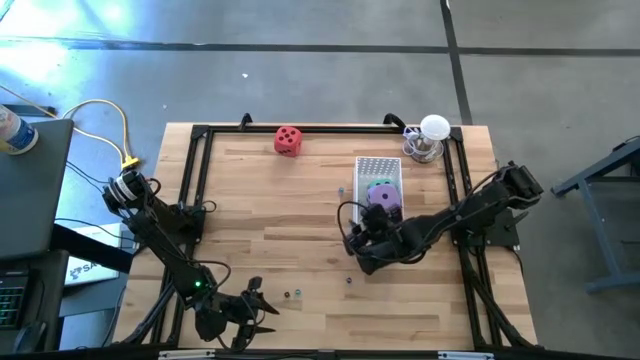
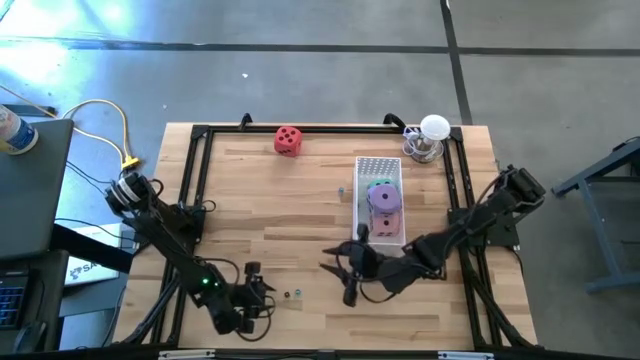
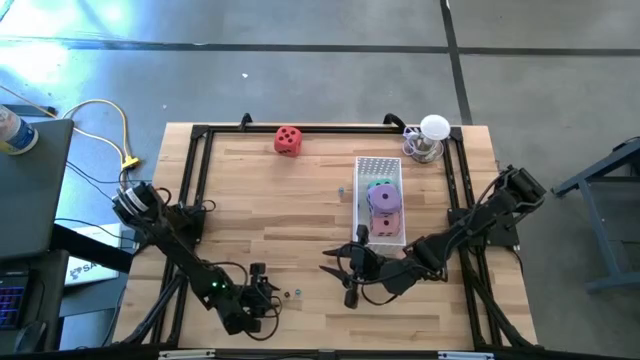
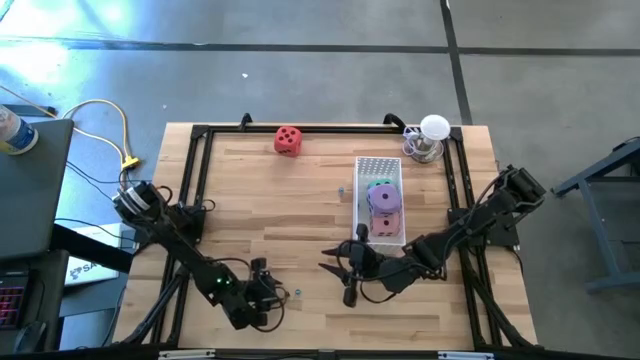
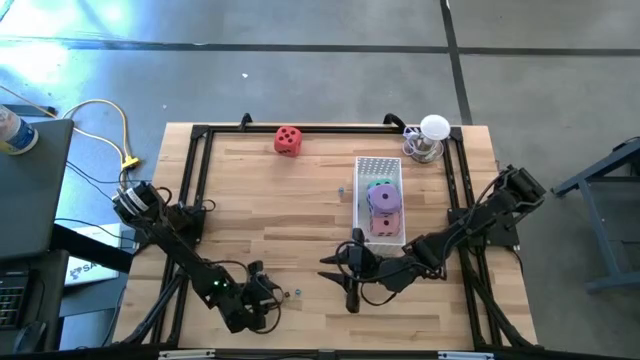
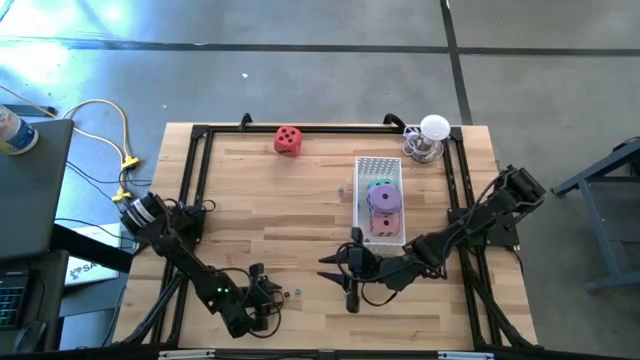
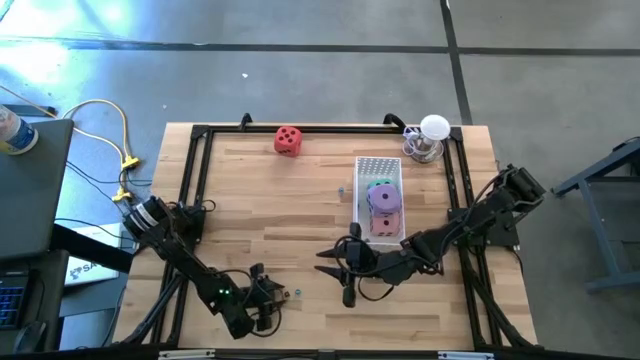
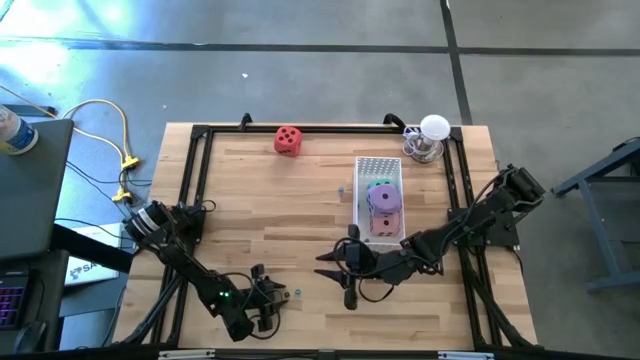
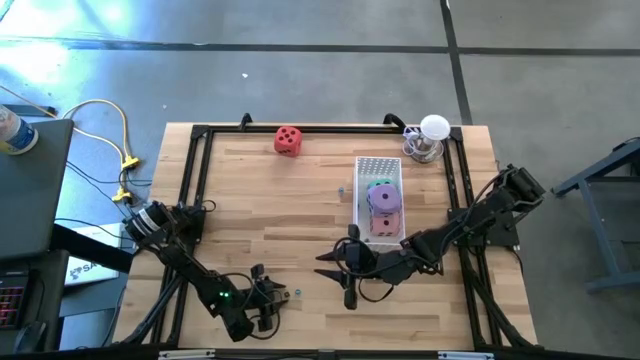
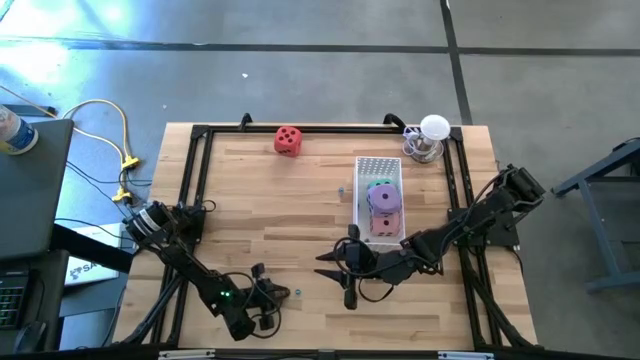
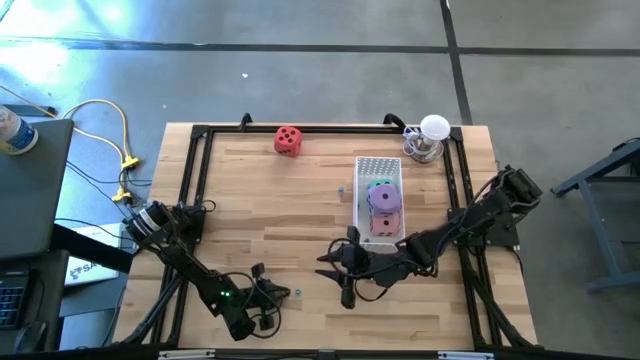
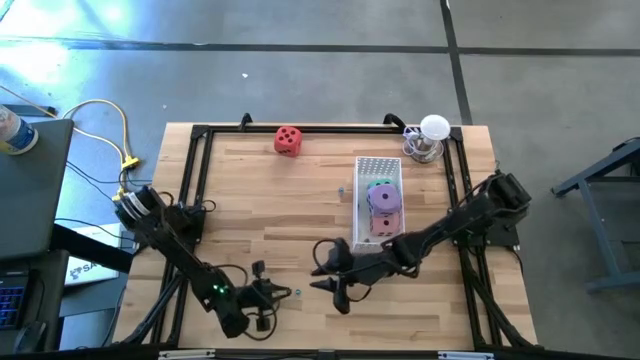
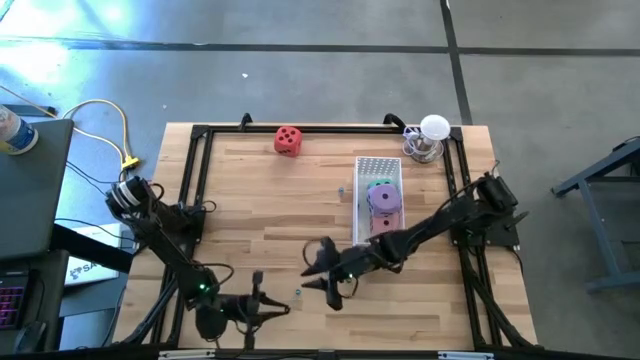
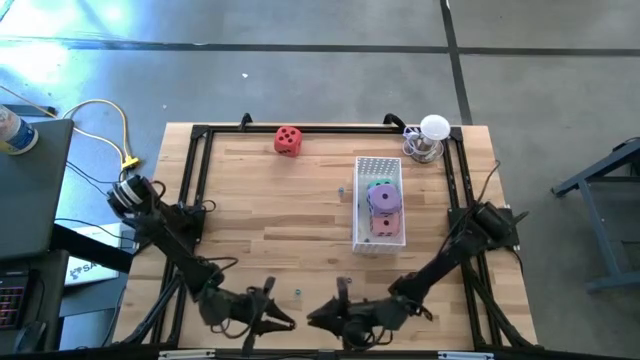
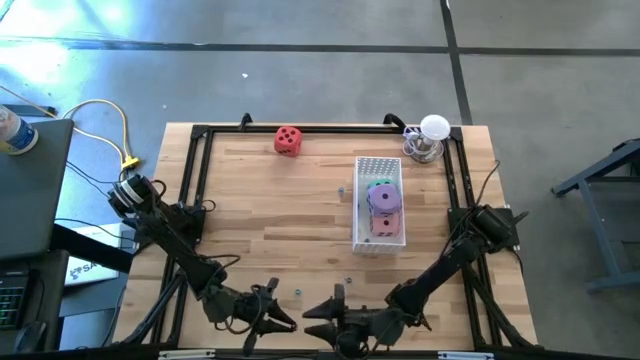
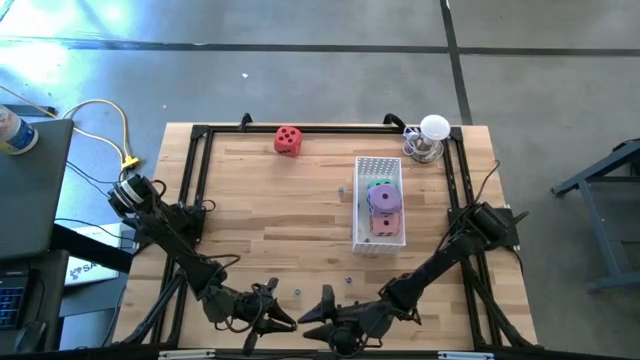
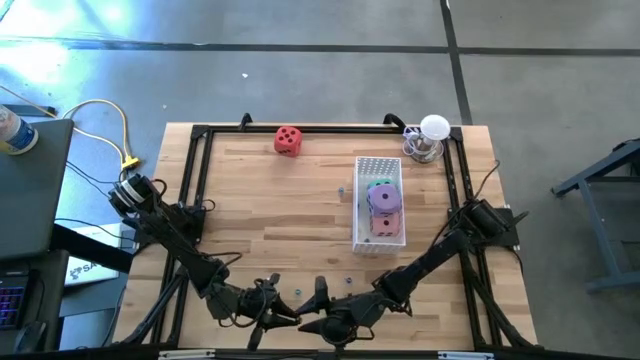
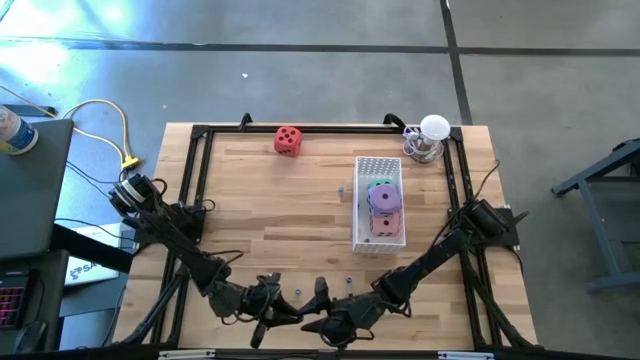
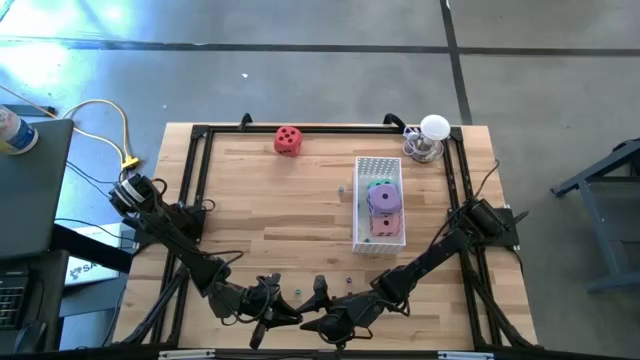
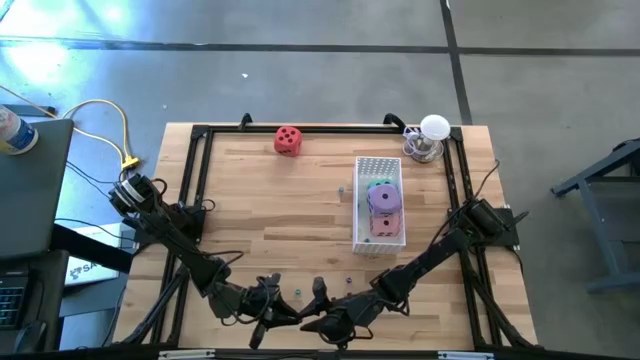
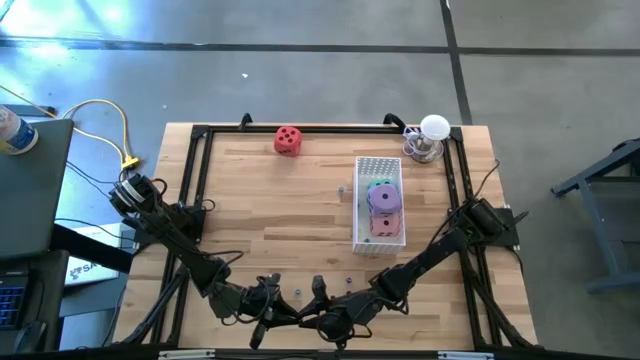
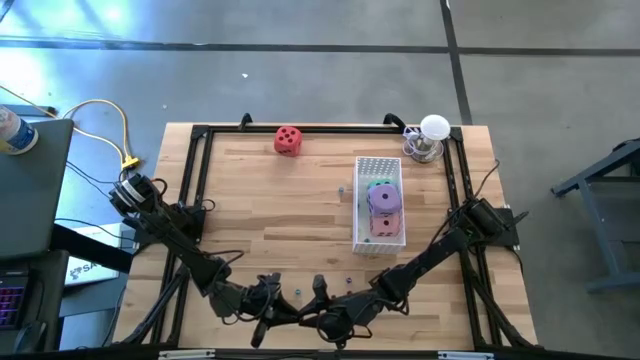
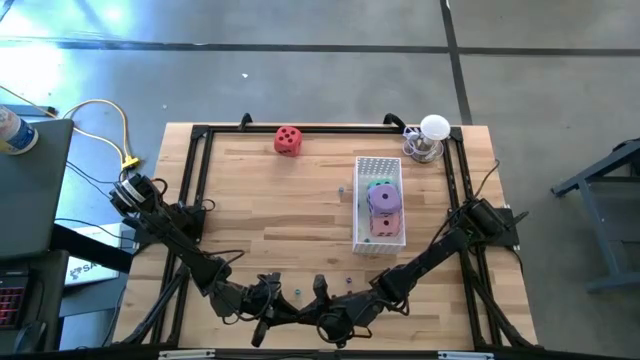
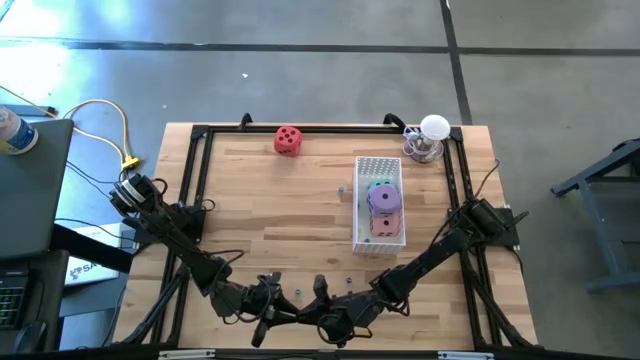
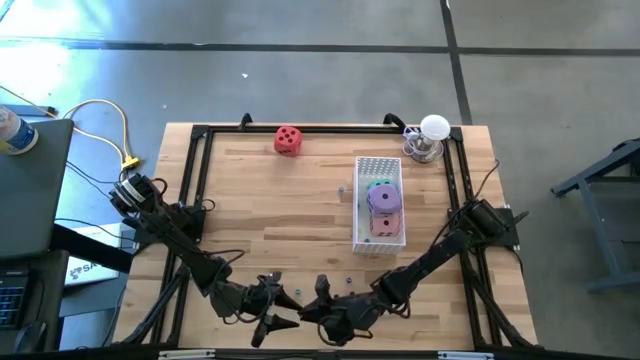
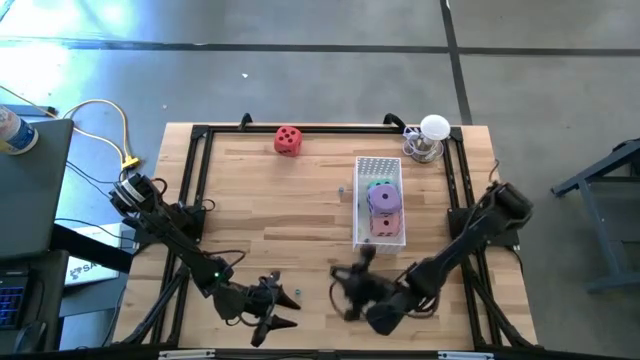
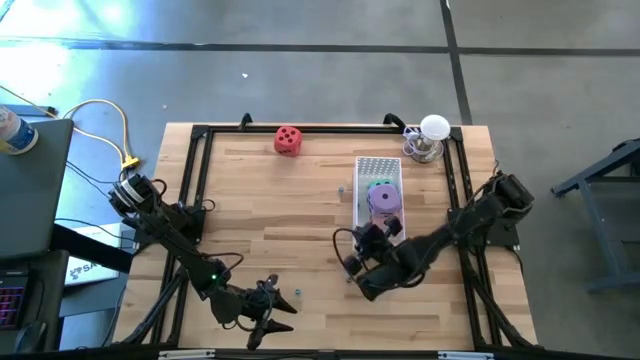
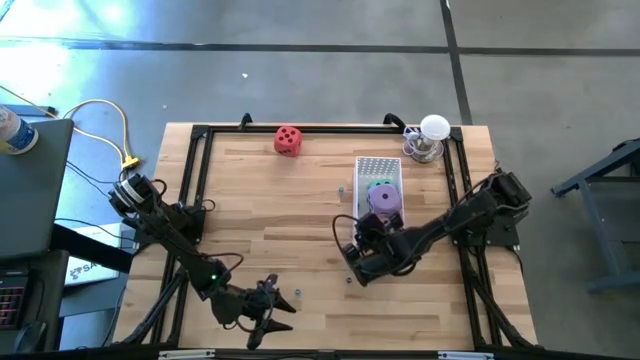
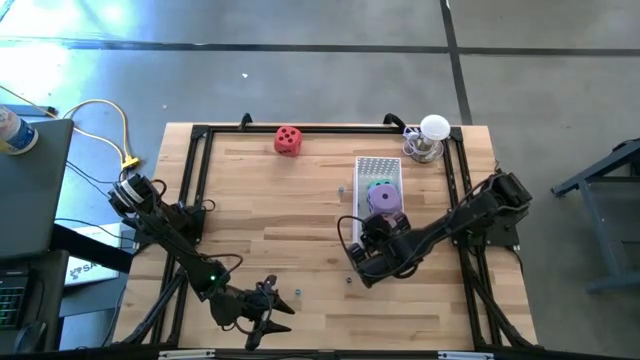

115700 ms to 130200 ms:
Task: Pick & Place Dice
Put the black die into the white bin

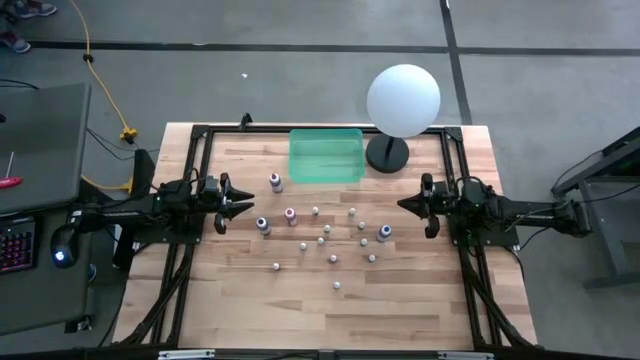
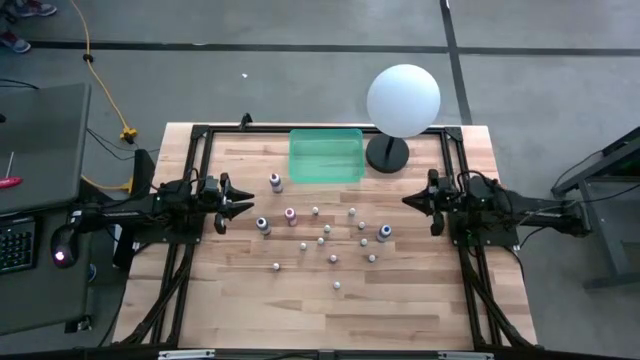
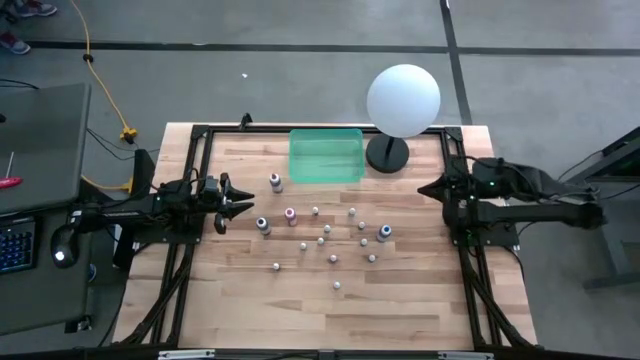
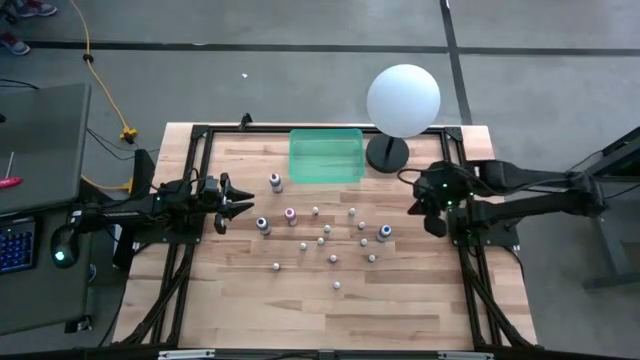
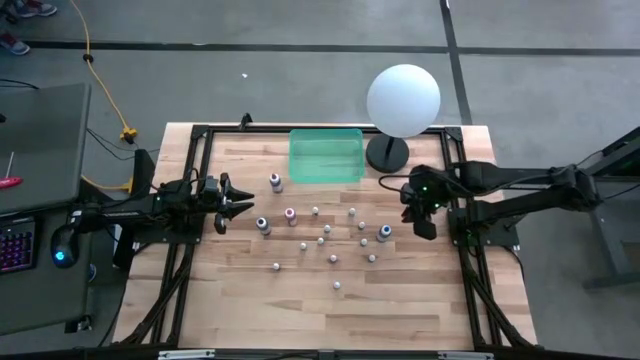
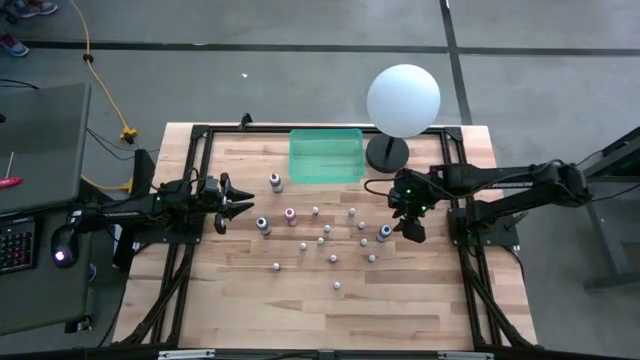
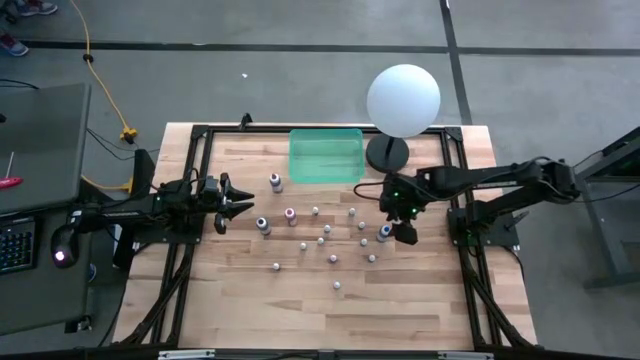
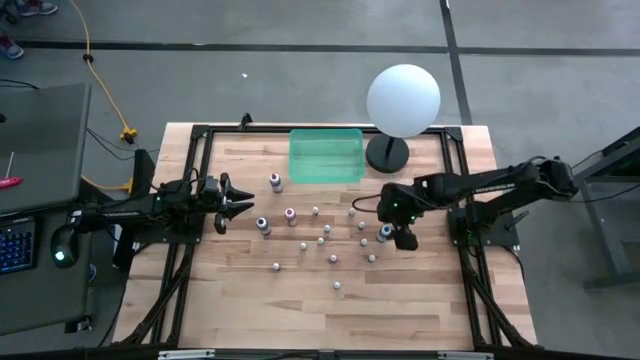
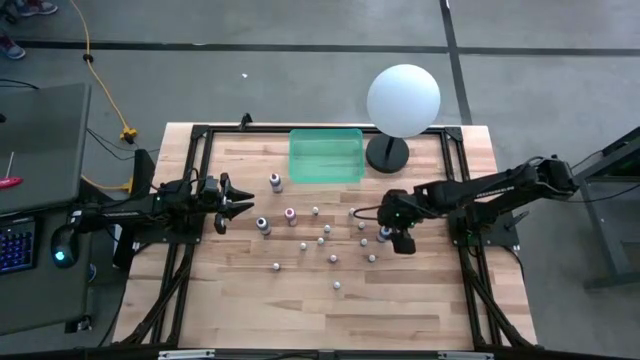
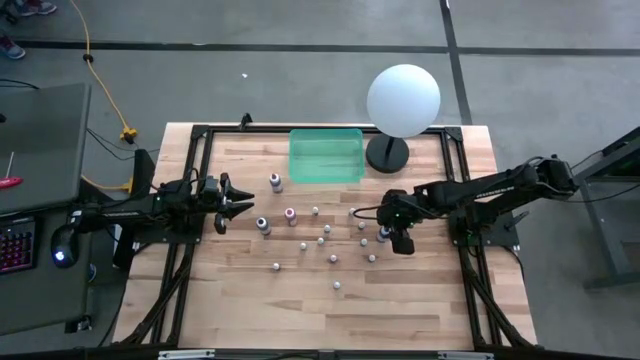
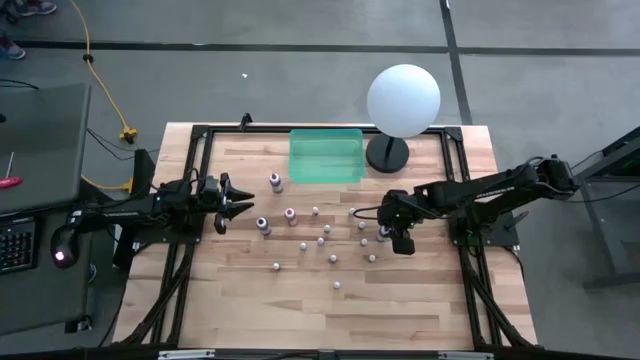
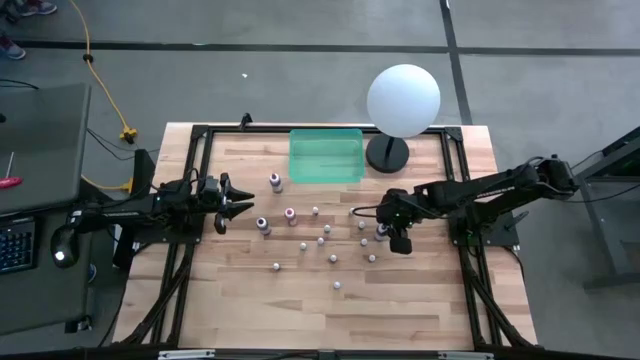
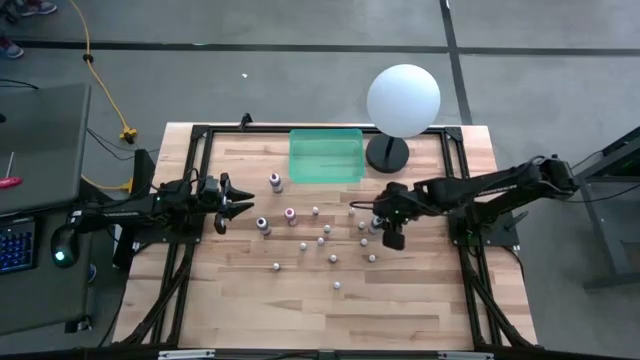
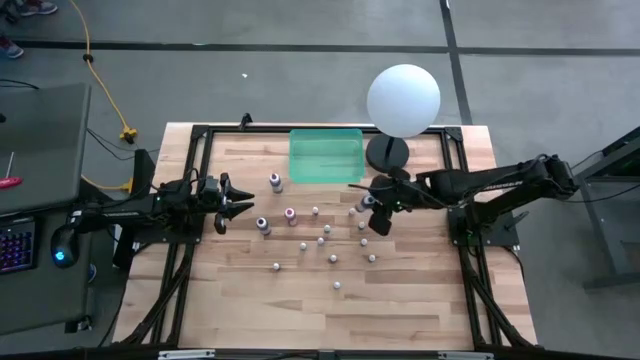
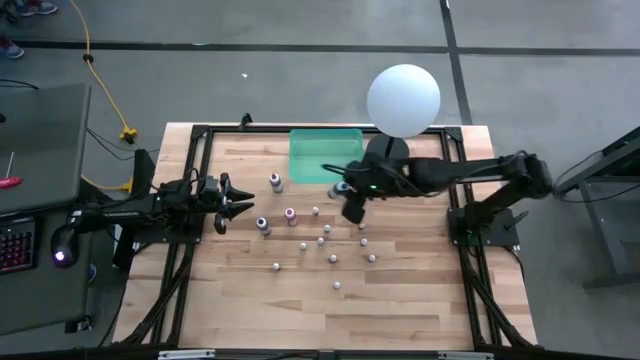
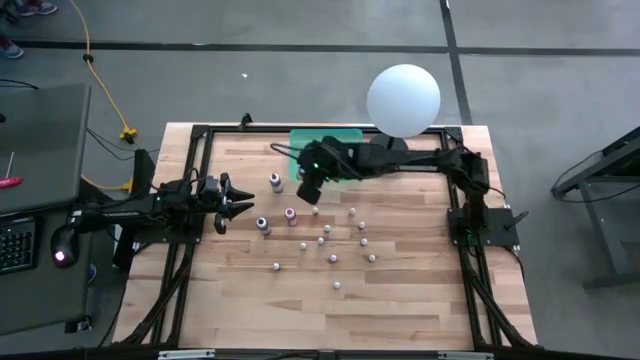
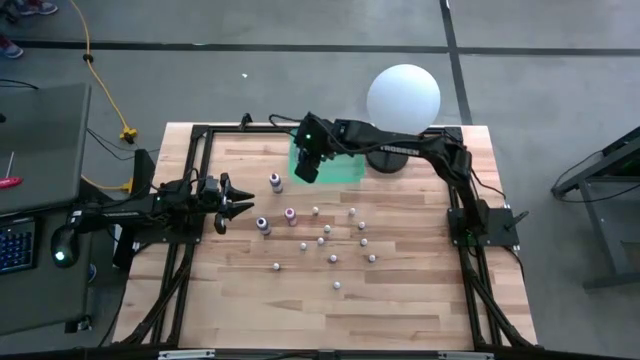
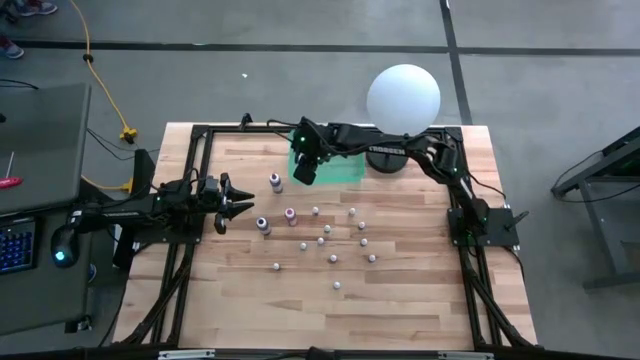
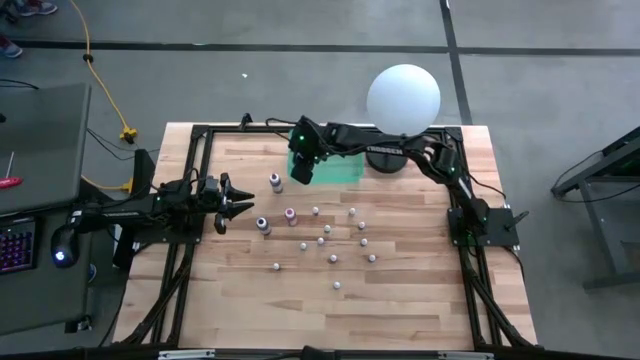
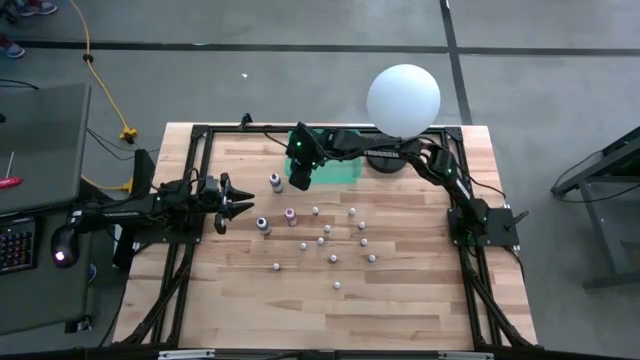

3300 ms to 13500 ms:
Task: Pick & Place food coloring
Put the large blue food coloring bottle into the green bin
